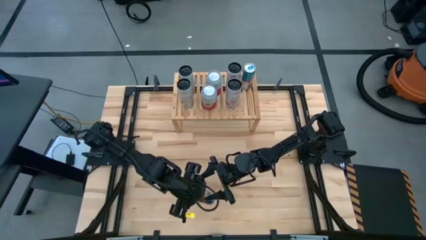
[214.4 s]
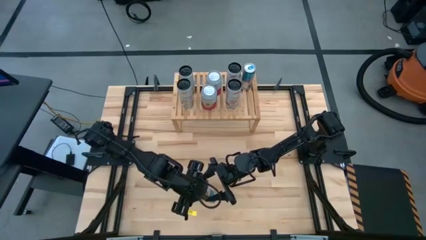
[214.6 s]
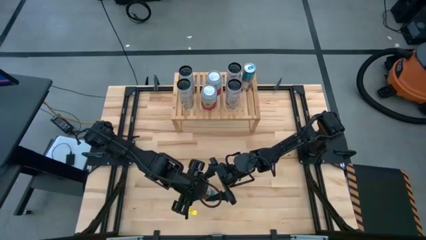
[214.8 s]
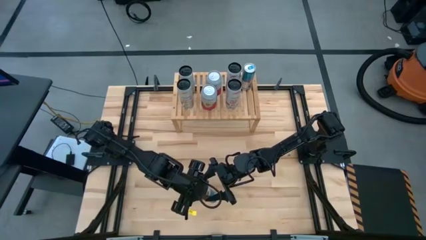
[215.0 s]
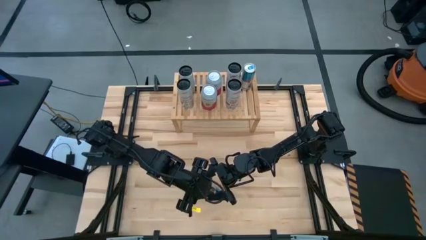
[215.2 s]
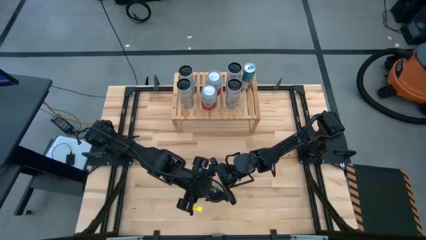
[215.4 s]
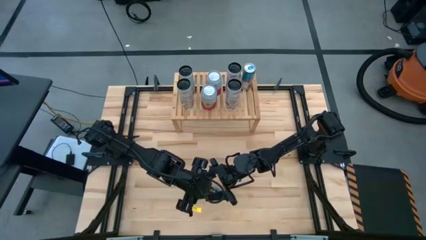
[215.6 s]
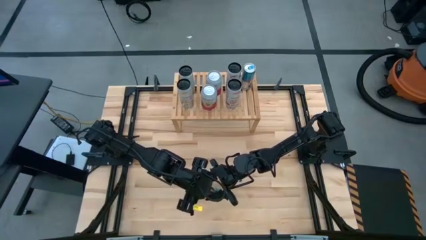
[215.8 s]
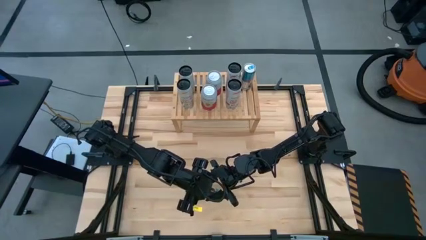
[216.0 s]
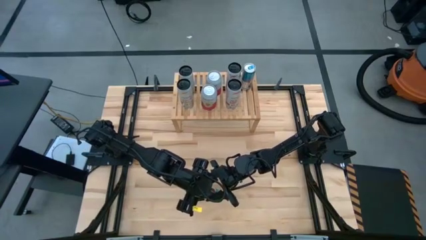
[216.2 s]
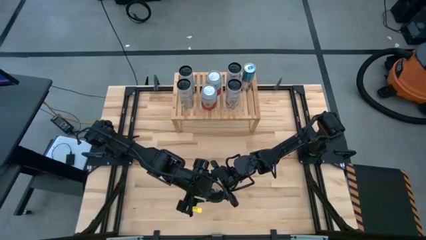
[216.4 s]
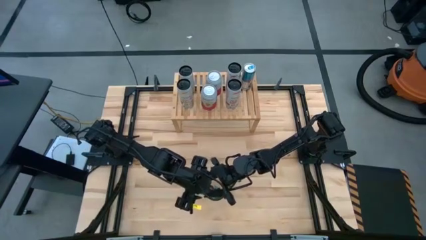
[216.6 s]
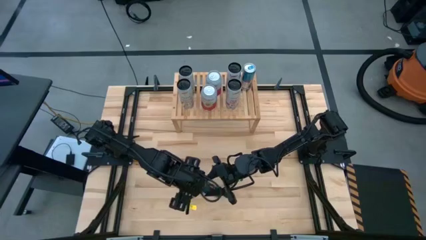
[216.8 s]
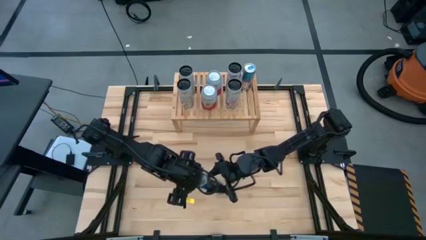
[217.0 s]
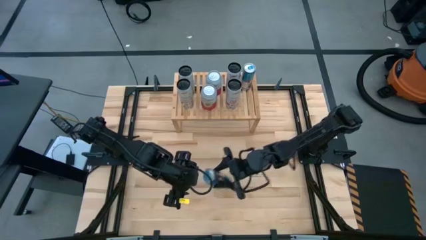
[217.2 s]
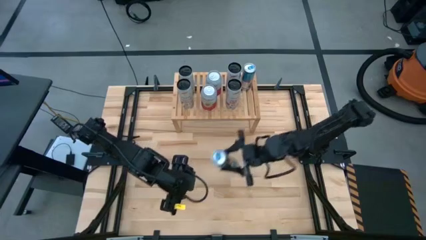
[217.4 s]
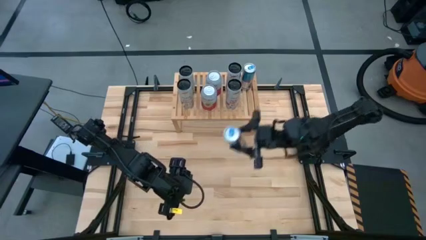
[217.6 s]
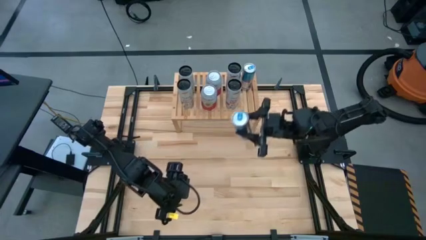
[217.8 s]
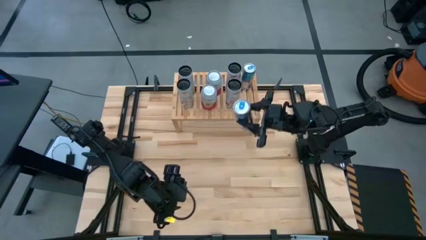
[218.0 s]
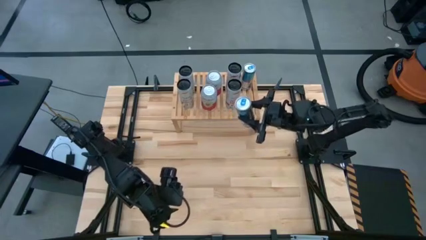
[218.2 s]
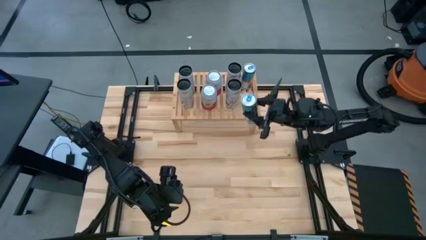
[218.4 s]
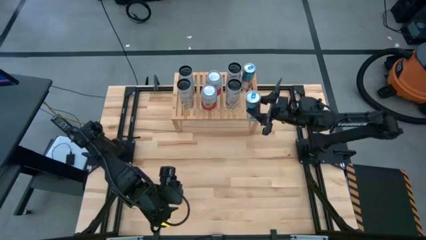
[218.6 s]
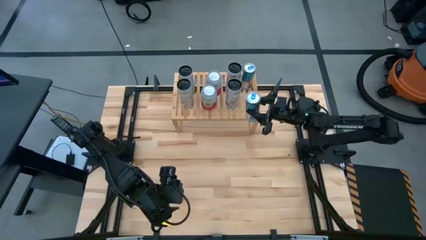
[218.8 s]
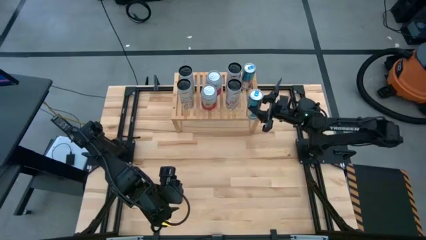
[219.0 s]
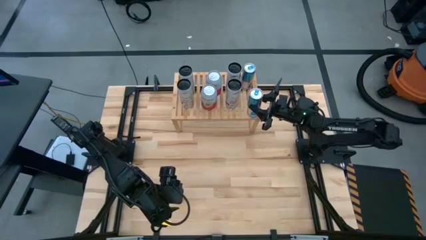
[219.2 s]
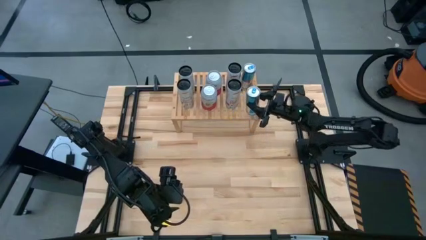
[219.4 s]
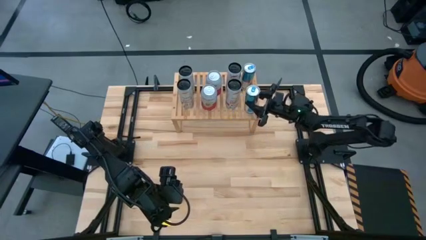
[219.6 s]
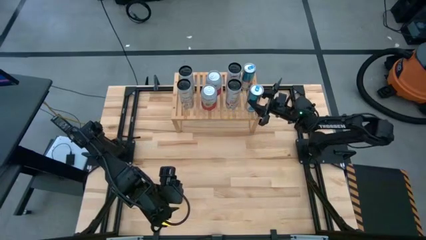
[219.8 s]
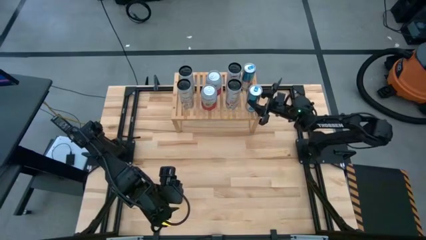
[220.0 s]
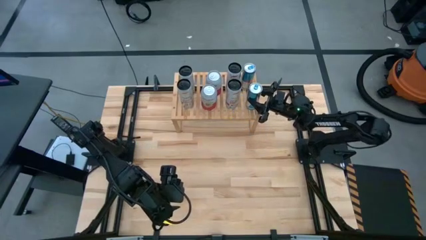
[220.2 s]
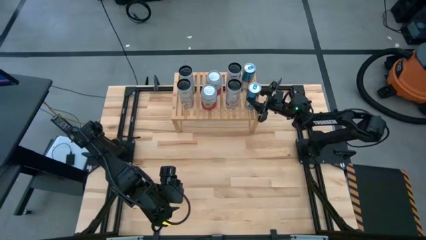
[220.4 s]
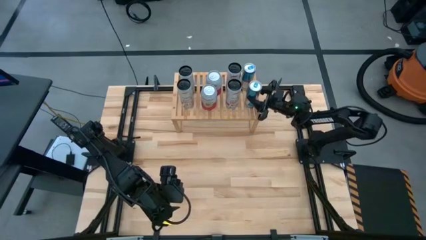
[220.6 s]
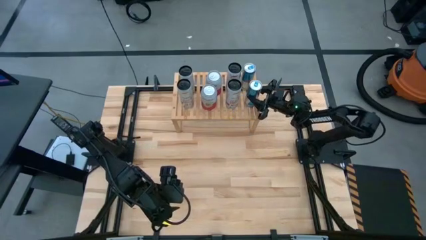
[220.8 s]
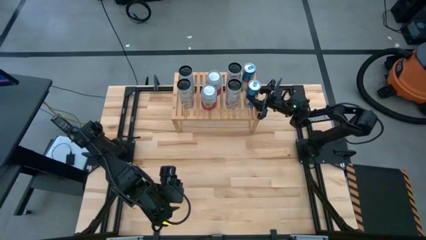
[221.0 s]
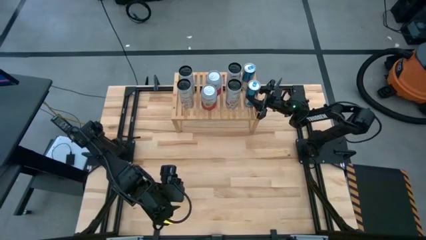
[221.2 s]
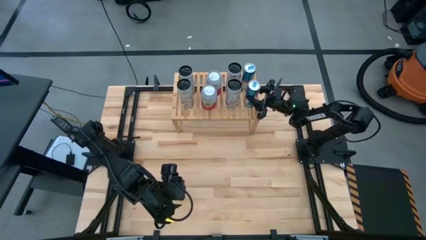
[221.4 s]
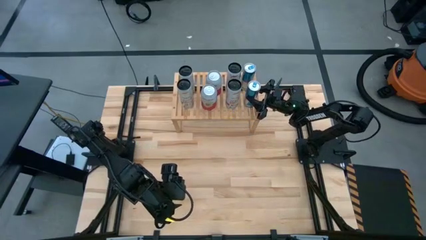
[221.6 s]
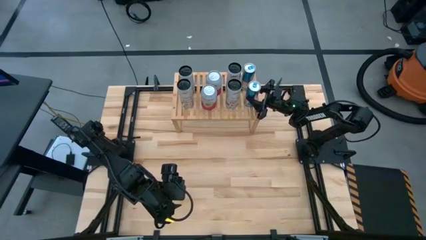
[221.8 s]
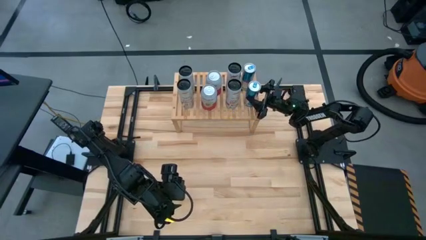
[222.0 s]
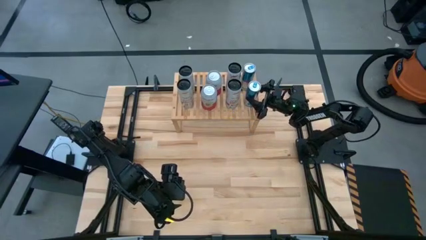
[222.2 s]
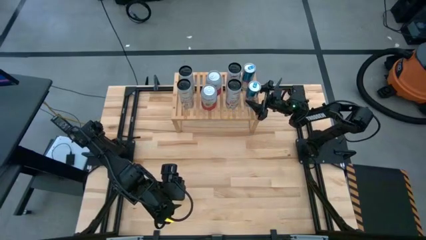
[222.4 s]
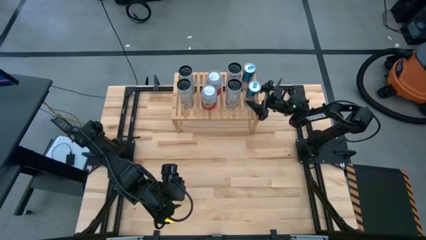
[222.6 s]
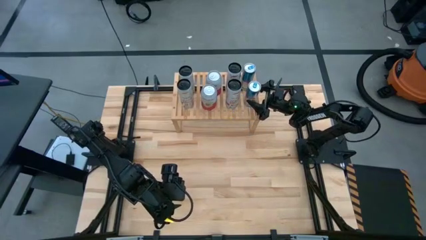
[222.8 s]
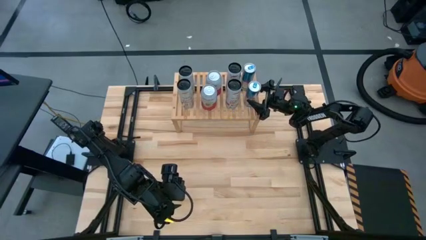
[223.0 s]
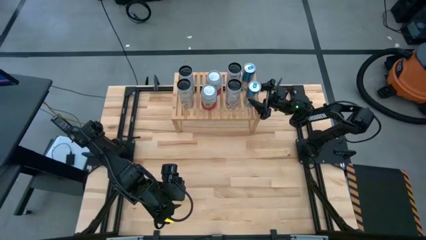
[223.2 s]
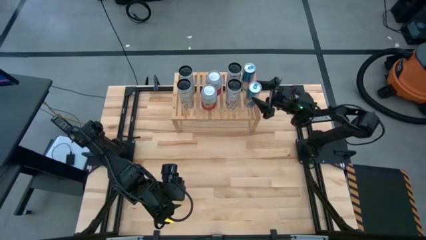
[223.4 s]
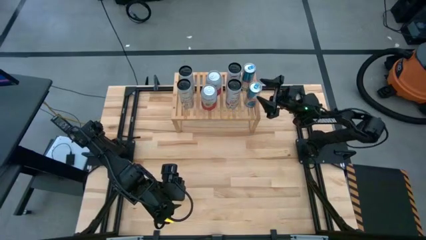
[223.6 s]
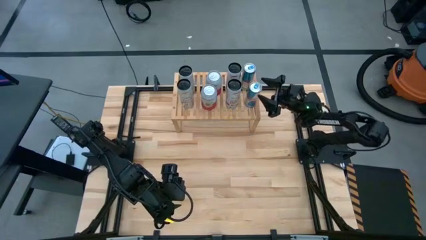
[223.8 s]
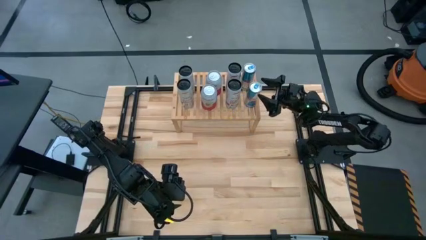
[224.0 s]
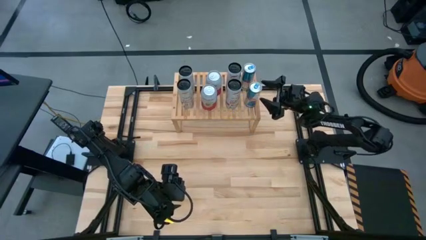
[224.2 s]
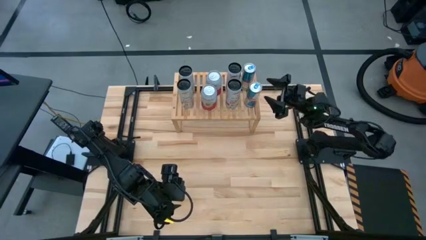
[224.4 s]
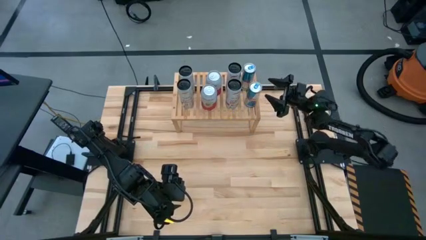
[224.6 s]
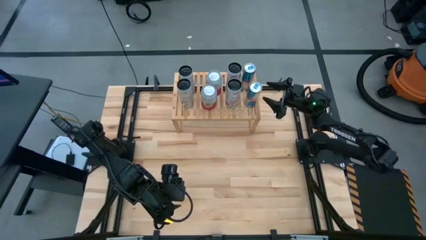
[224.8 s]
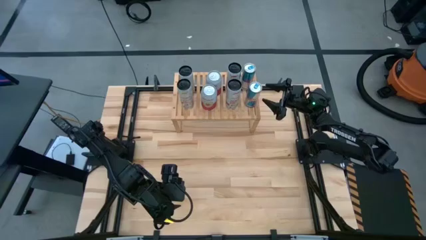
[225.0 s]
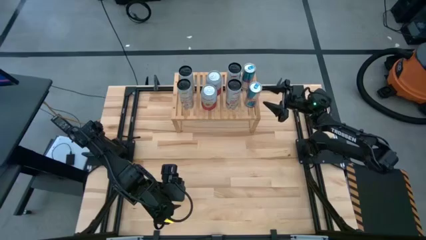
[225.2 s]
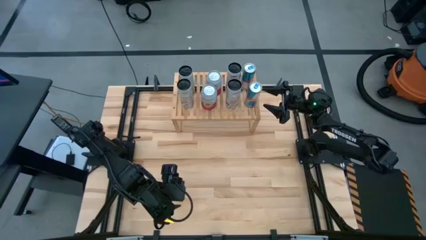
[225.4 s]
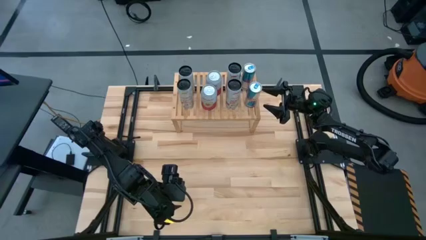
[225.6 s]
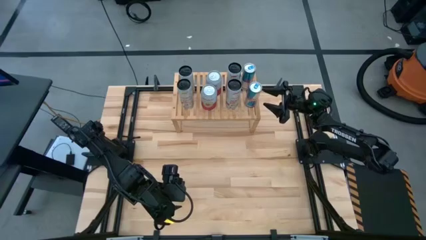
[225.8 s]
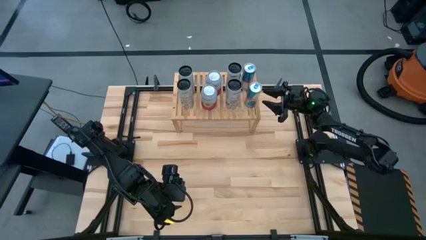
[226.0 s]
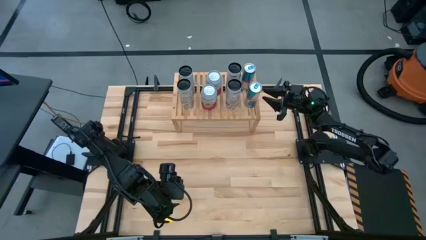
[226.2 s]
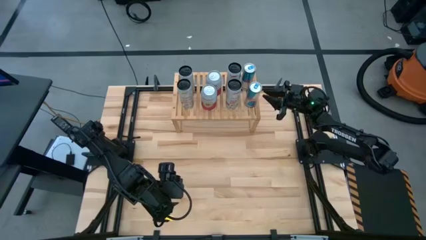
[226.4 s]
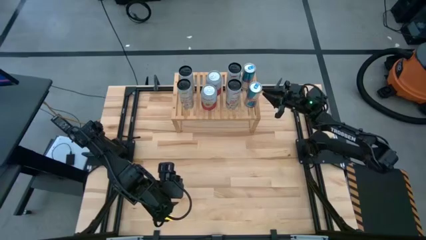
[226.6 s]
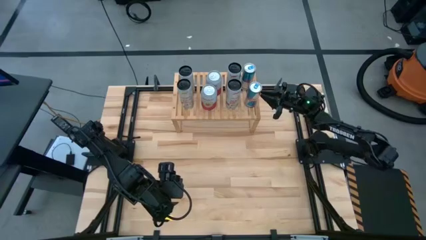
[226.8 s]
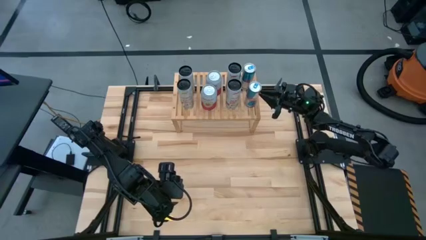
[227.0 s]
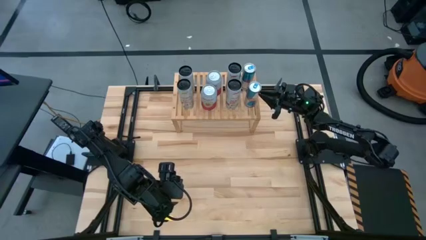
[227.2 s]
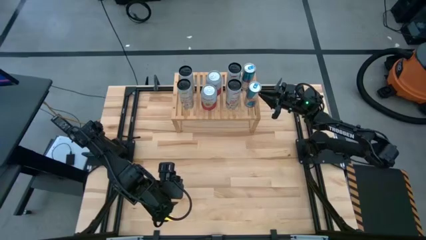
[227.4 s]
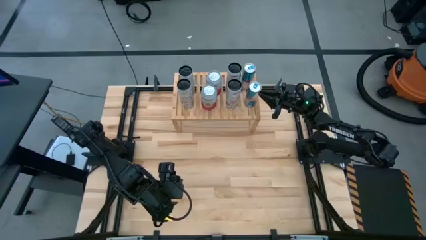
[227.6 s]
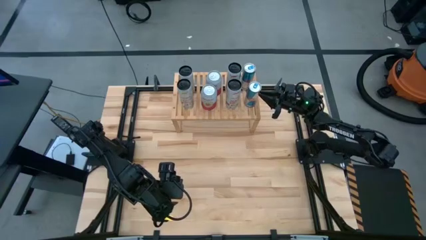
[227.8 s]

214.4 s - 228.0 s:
Task: Place canned beverage on shelf
Put the blue soda can on the shelf aligned with the other blue soda can
